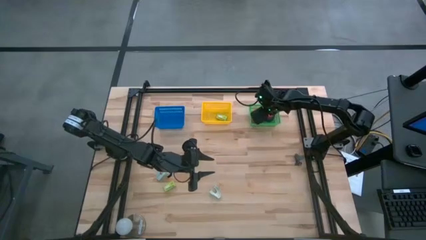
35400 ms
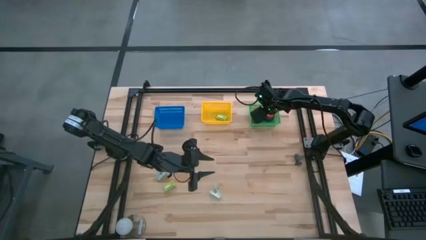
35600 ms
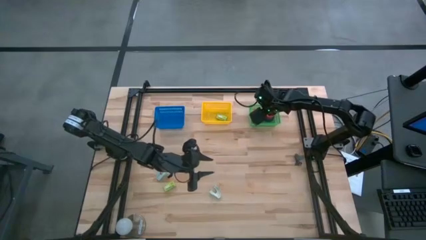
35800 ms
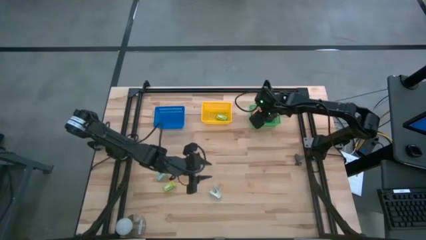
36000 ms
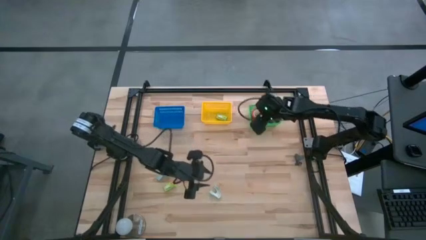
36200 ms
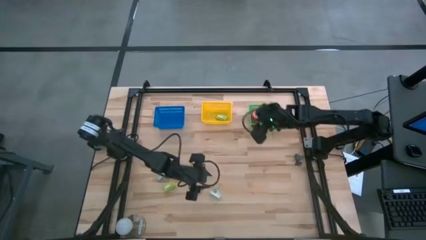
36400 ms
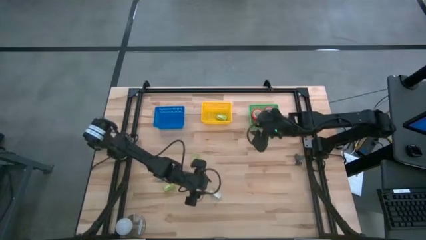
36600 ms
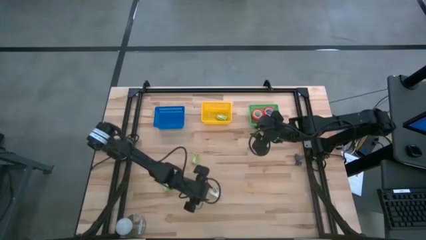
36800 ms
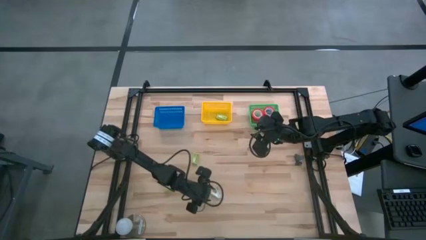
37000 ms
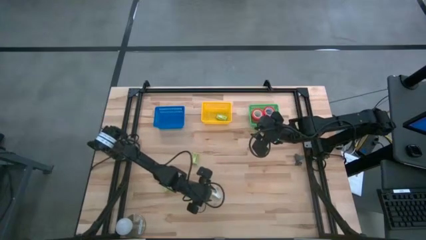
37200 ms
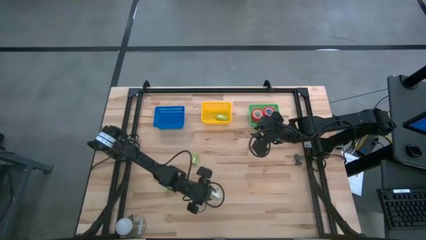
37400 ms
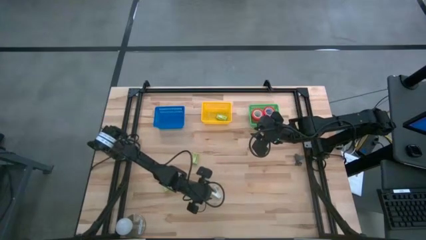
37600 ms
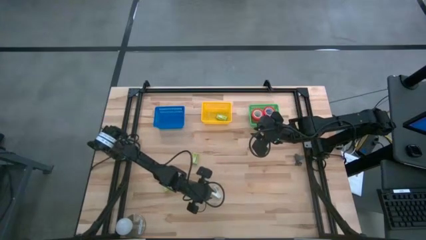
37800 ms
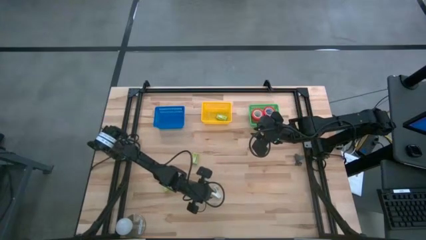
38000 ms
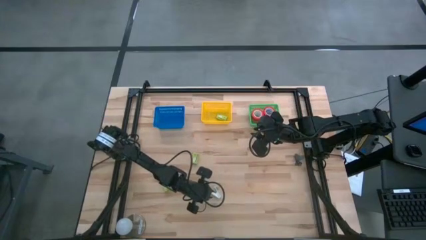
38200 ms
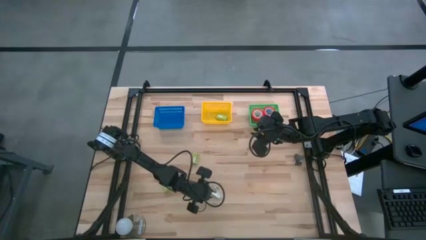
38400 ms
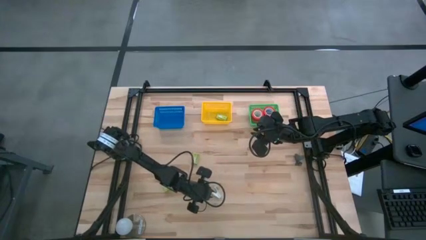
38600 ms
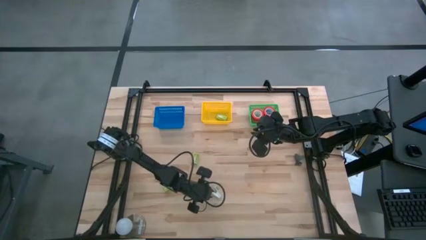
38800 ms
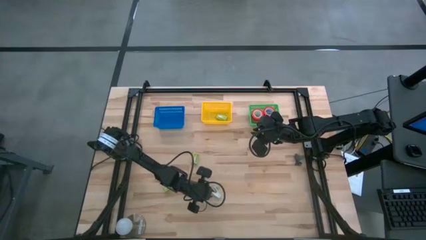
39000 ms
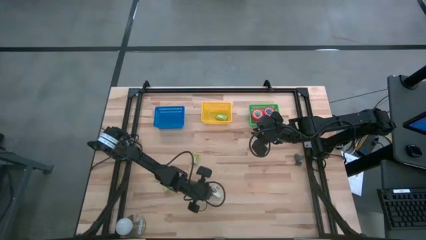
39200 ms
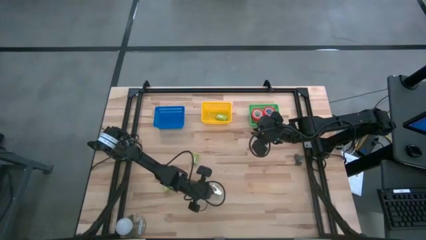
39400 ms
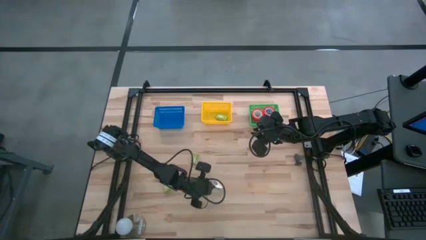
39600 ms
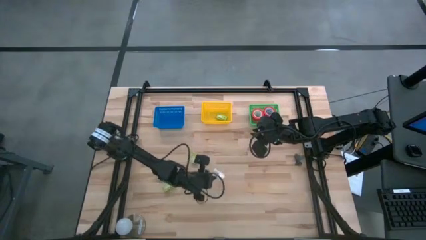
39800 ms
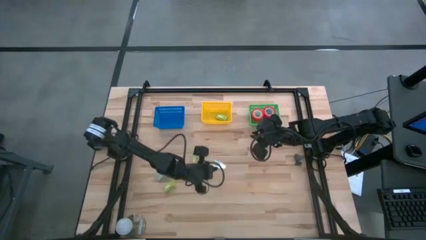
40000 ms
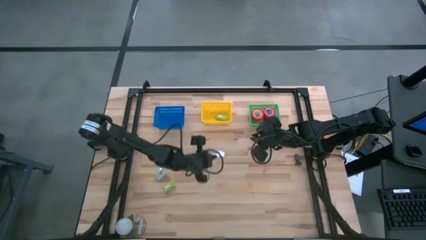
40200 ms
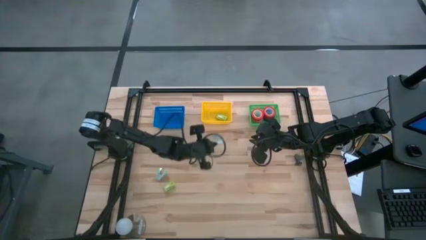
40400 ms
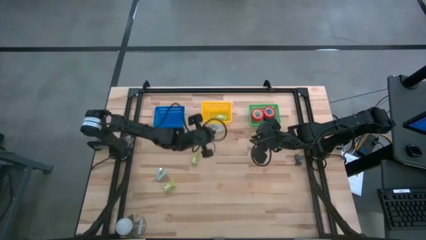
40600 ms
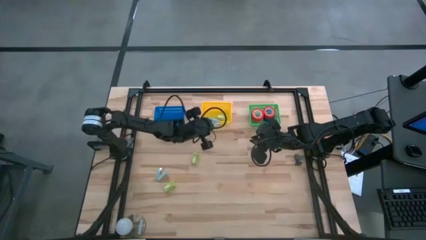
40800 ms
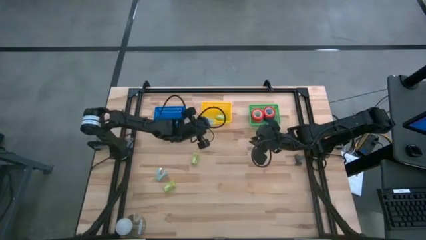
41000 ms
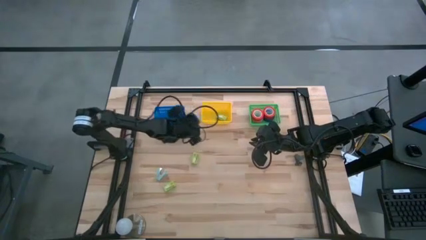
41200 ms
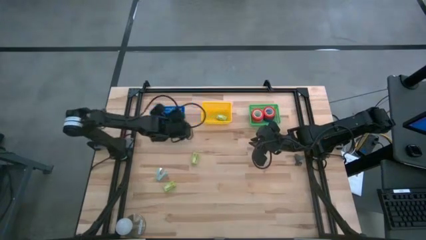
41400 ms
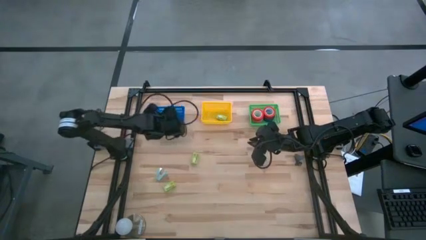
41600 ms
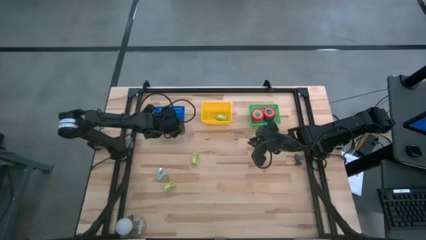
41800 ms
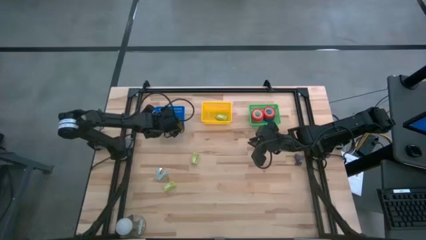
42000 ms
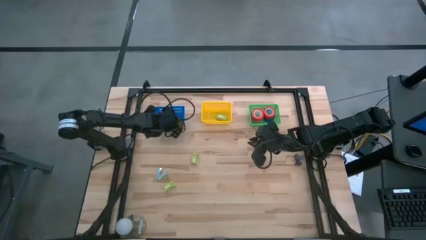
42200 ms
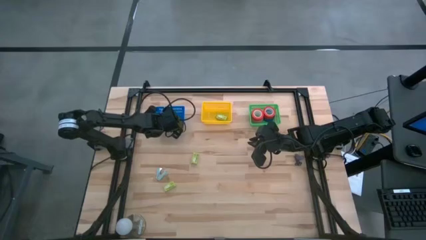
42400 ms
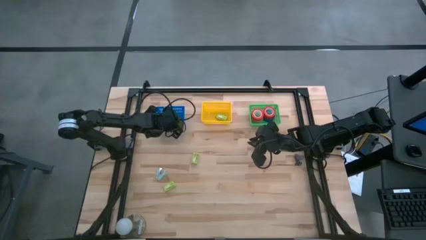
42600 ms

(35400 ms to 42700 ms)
Task: Pick and place Stapler, Stapler remover, tape
Put the bottom light blue staple remover into the blue basket

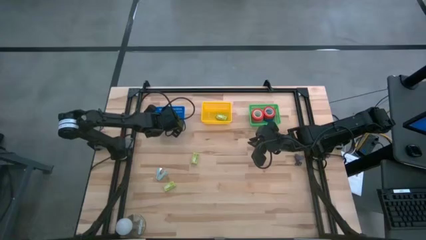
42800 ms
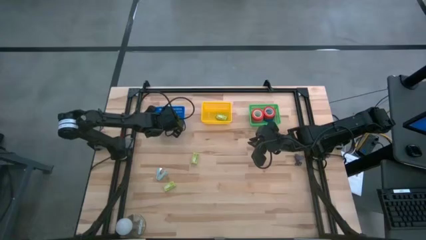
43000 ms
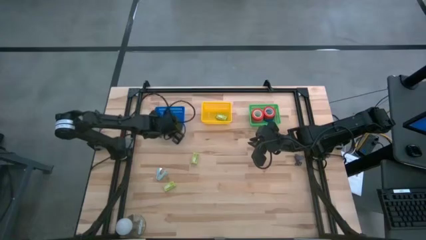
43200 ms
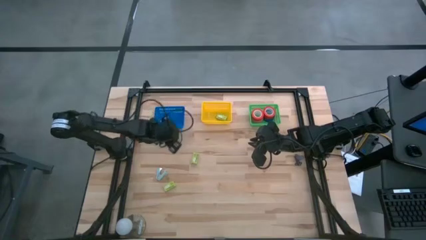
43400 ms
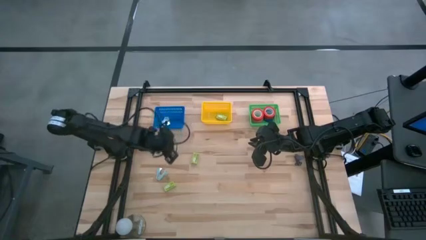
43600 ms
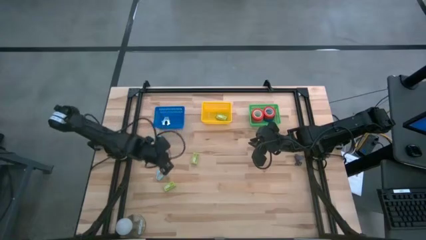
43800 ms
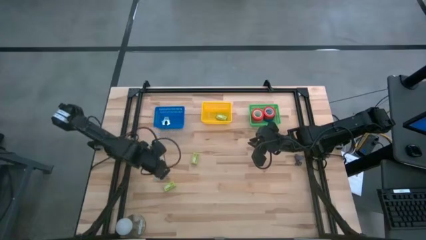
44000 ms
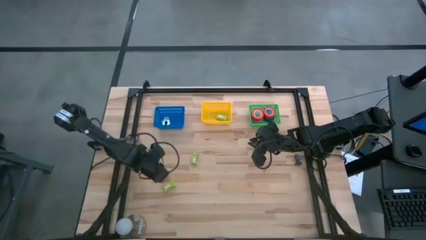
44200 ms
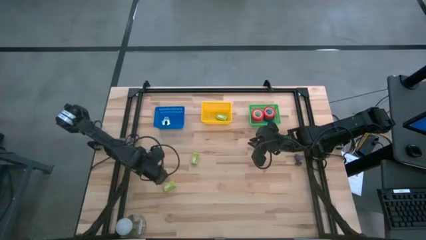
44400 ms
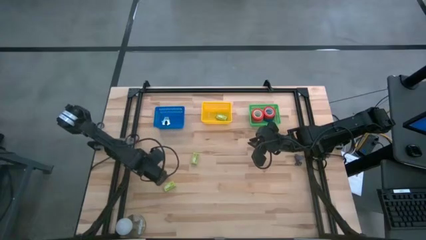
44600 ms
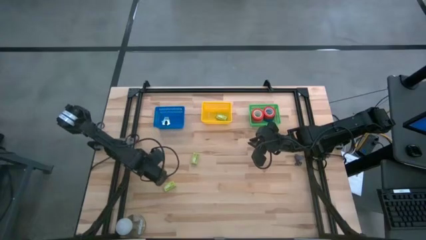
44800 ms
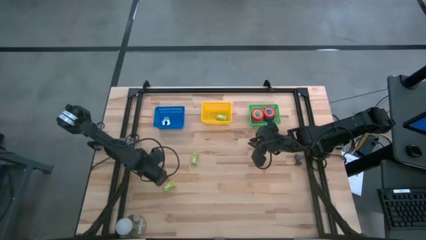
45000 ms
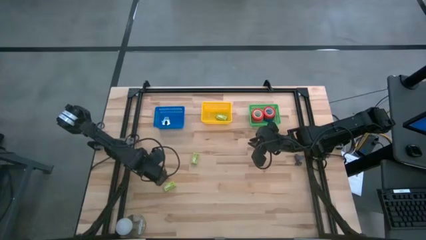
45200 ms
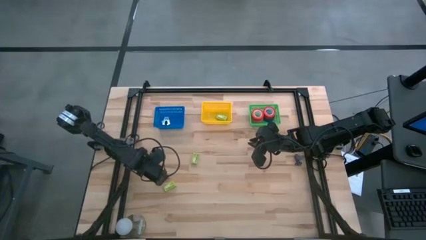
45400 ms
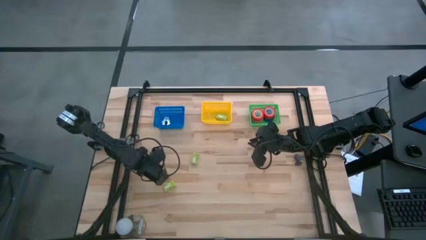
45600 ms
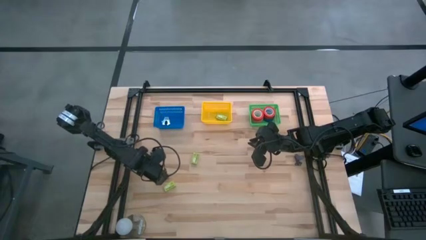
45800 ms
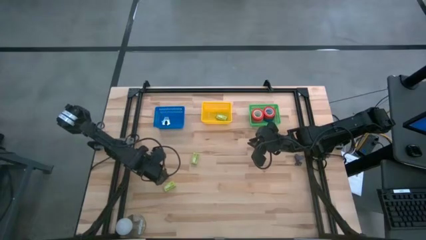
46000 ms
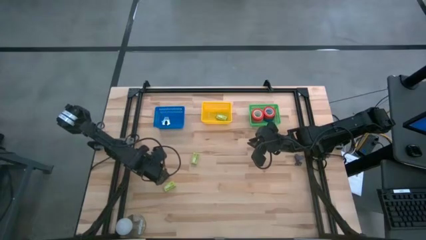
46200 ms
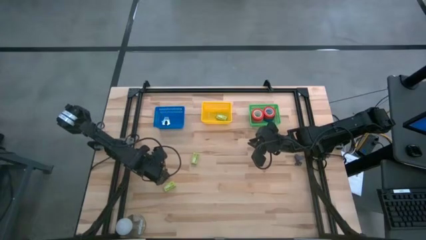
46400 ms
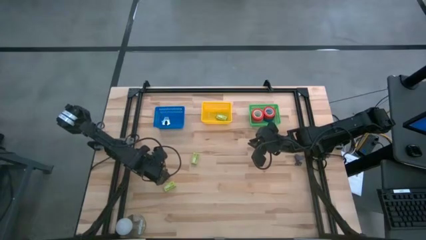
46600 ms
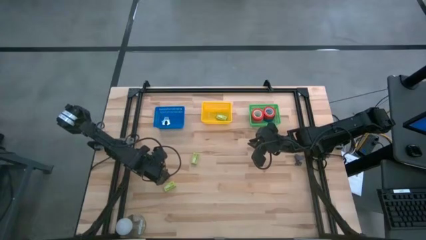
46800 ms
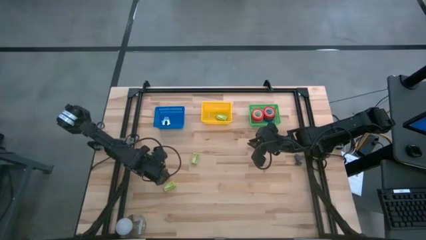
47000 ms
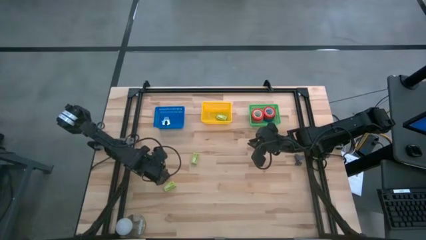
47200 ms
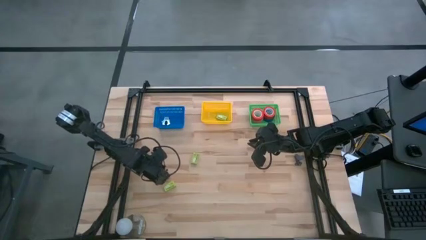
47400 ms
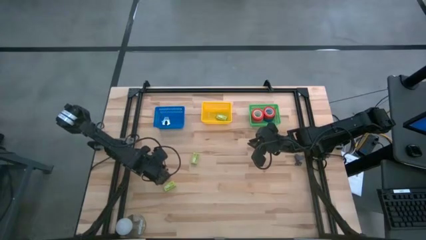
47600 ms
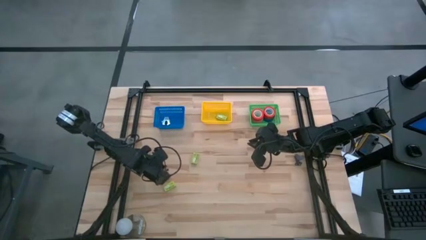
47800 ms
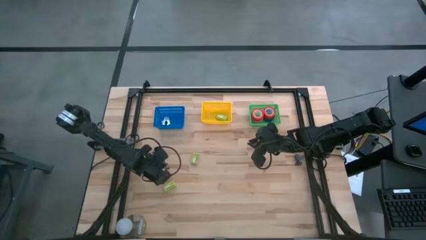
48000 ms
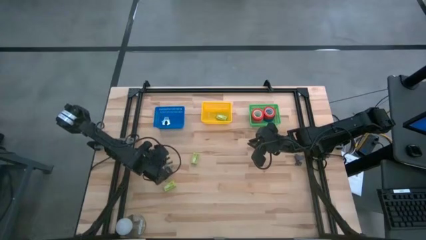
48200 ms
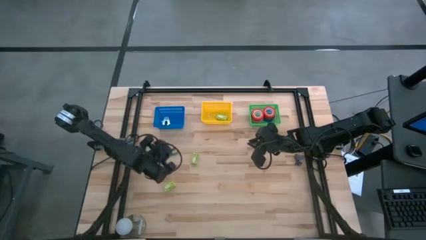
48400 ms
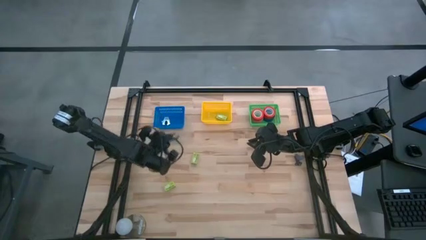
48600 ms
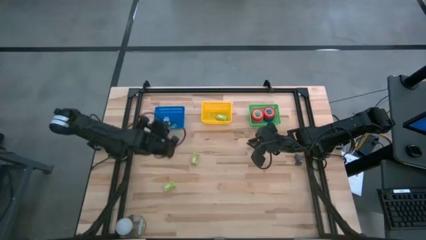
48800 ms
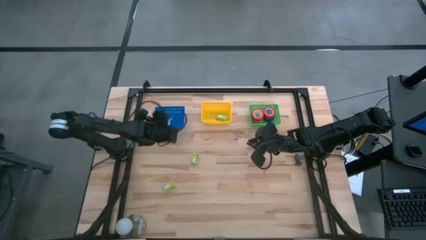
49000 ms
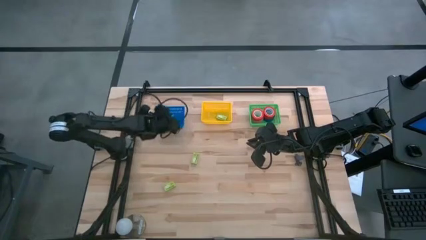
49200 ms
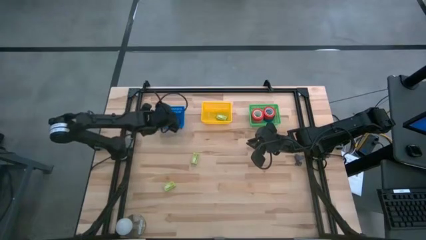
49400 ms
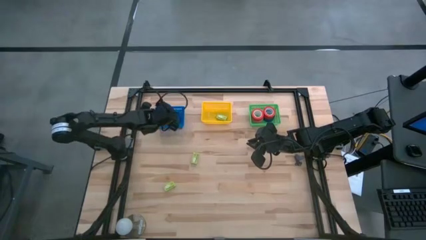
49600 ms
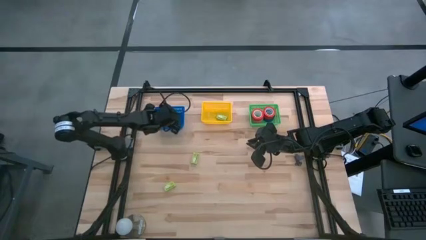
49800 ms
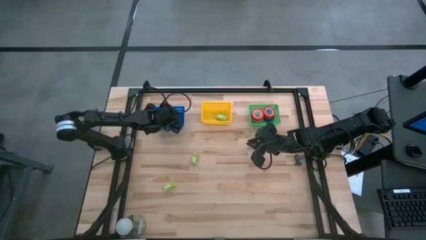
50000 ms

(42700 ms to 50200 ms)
Put the light blue staple remover into the blue basket

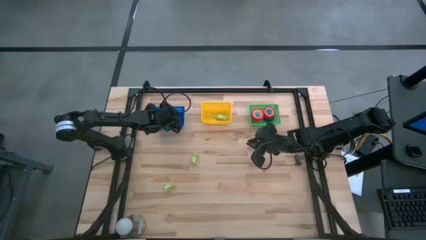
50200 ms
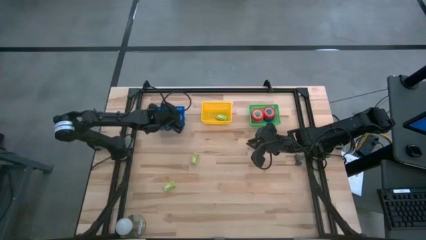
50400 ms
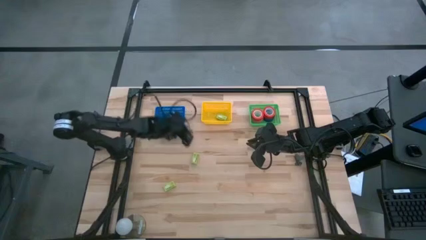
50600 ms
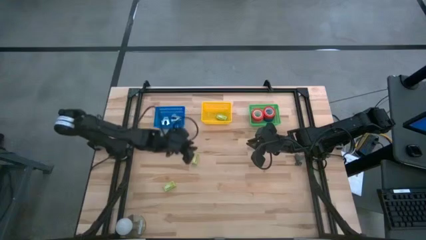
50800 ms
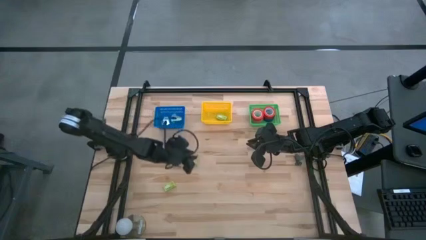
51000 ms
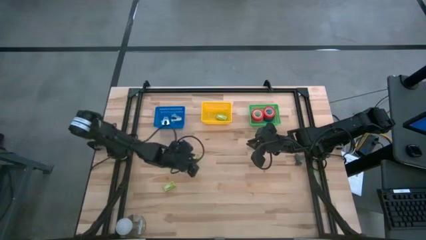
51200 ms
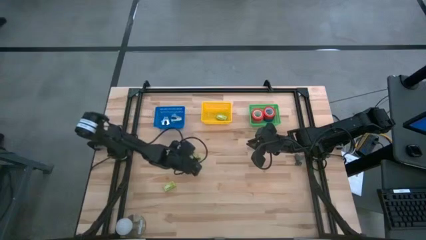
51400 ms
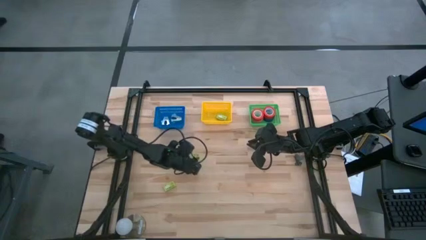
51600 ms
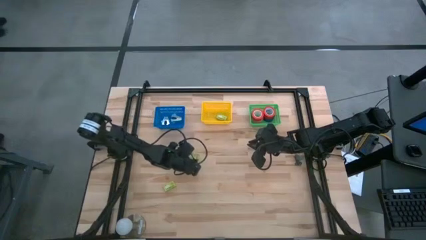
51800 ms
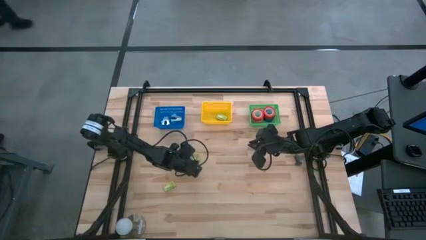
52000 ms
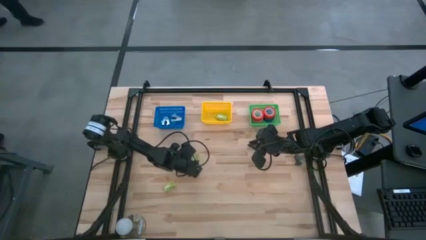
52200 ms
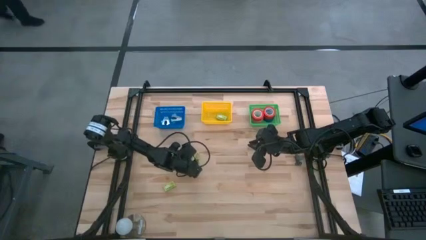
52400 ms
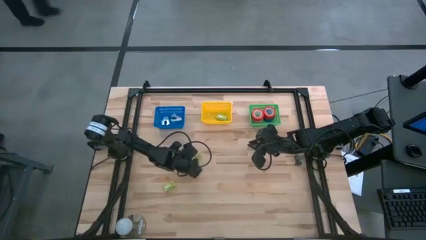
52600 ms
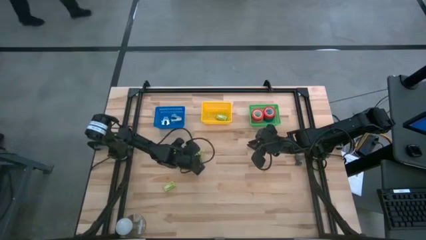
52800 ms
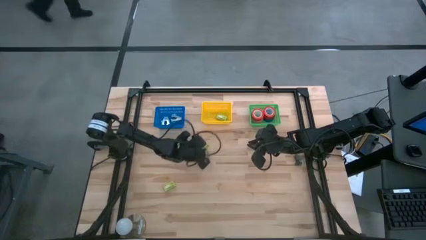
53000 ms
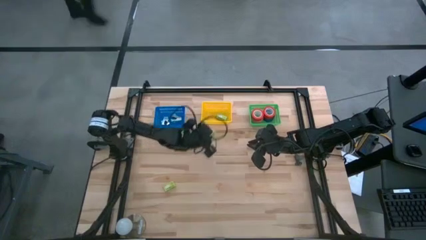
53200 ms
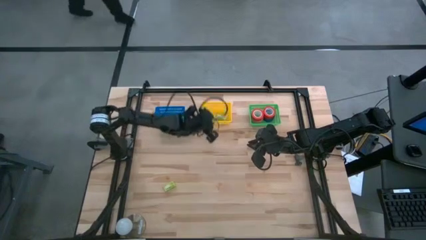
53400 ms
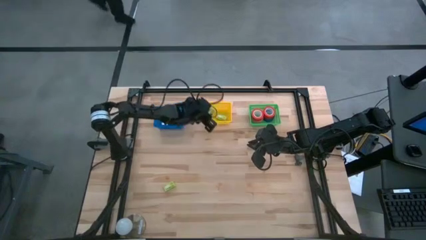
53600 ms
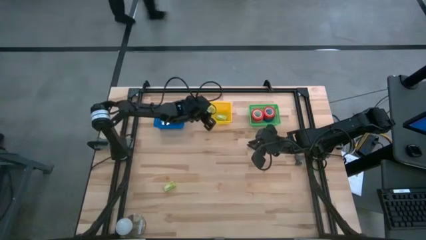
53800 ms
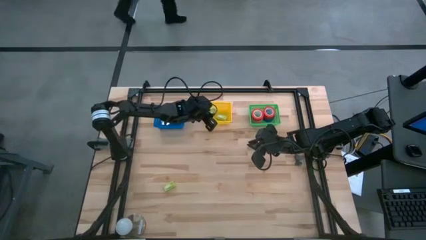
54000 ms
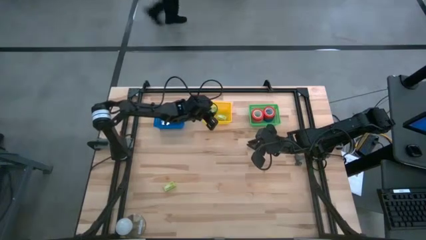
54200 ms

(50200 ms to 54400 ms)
Put the top green staple box into the yellow basket
